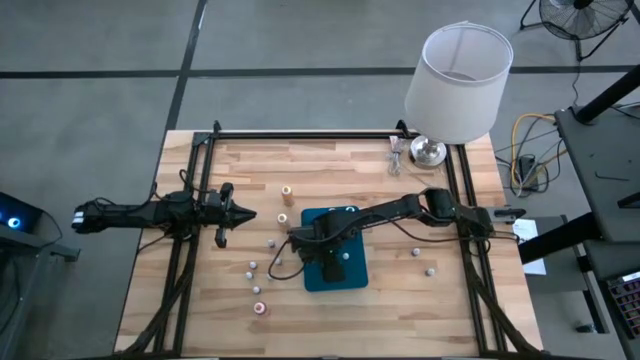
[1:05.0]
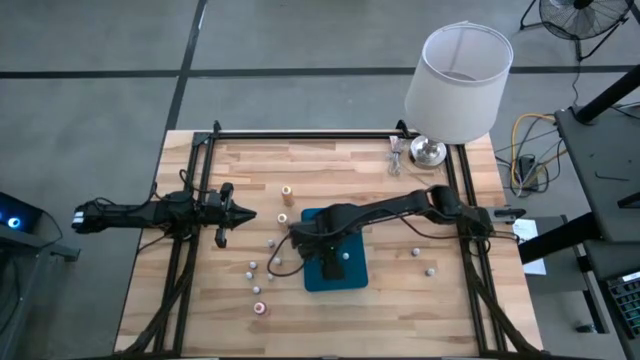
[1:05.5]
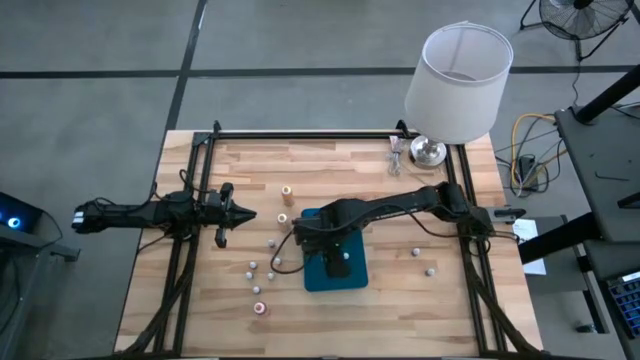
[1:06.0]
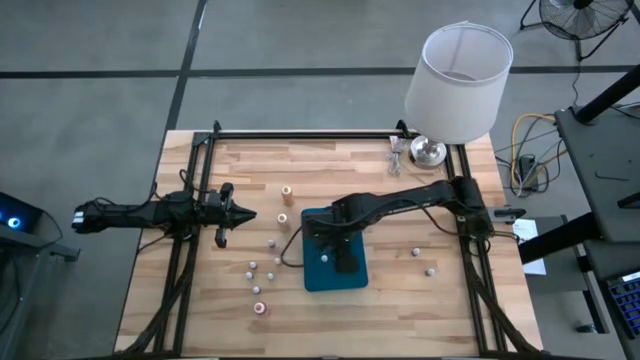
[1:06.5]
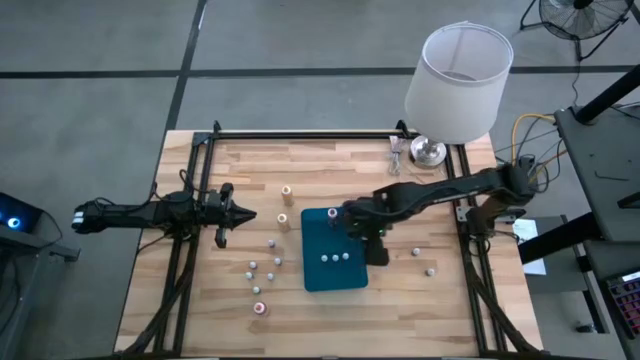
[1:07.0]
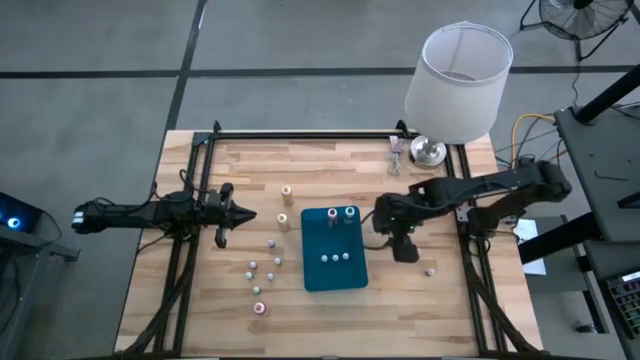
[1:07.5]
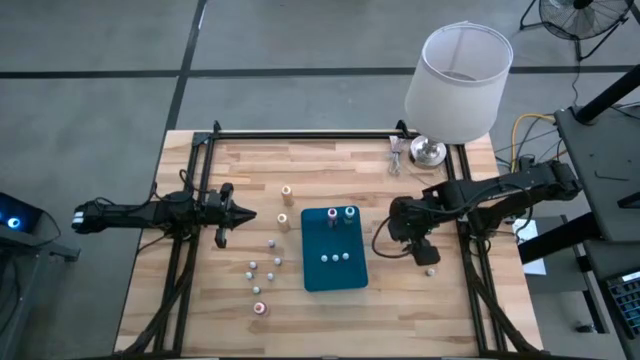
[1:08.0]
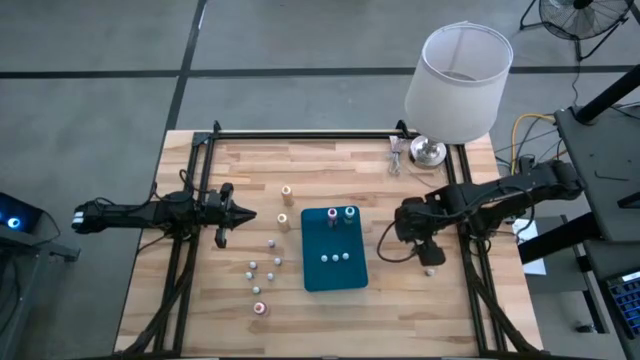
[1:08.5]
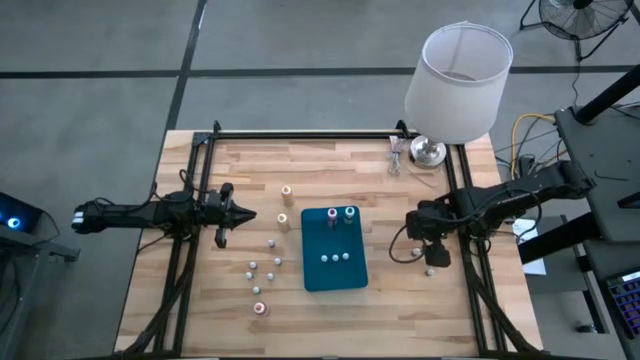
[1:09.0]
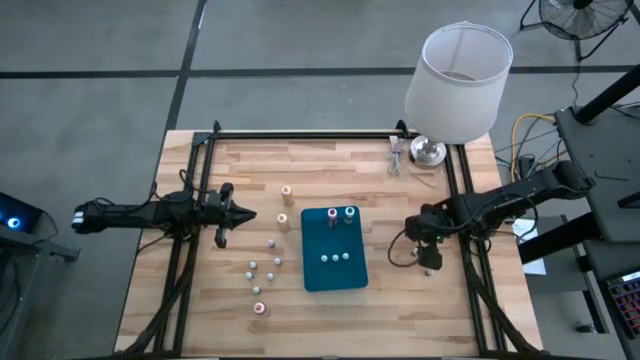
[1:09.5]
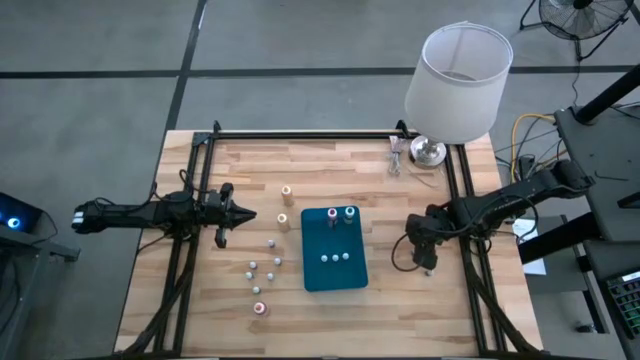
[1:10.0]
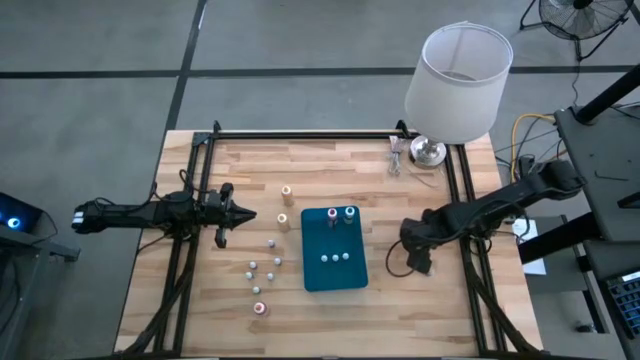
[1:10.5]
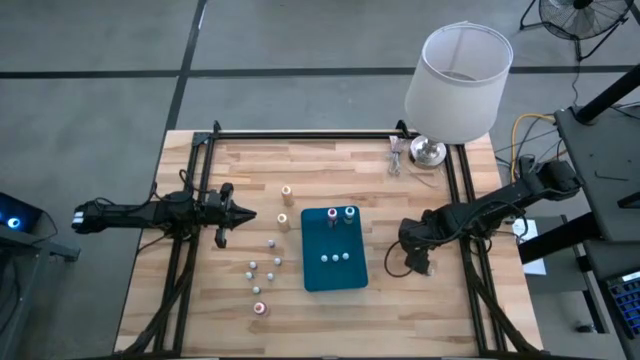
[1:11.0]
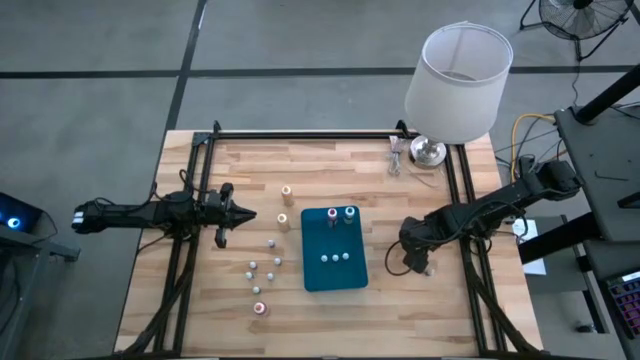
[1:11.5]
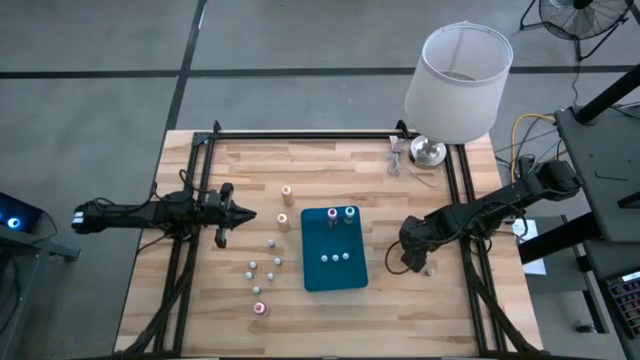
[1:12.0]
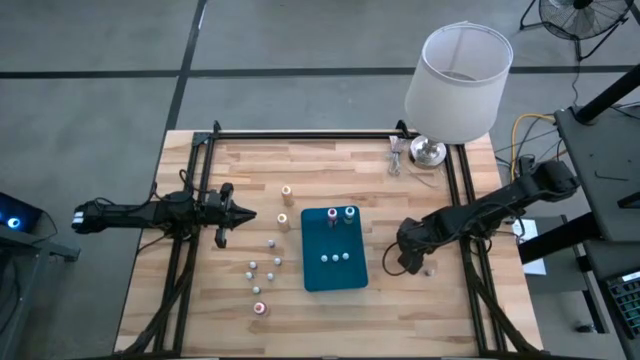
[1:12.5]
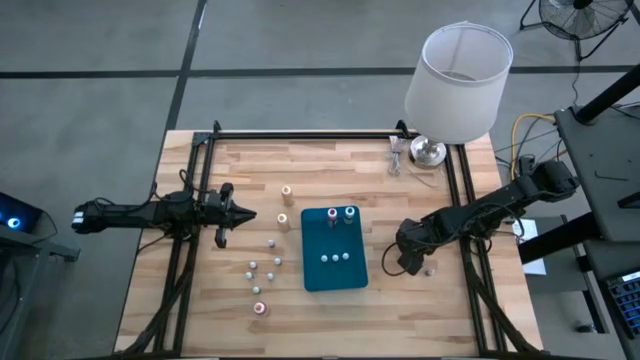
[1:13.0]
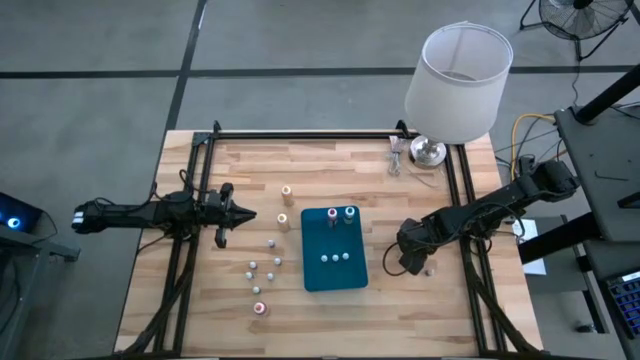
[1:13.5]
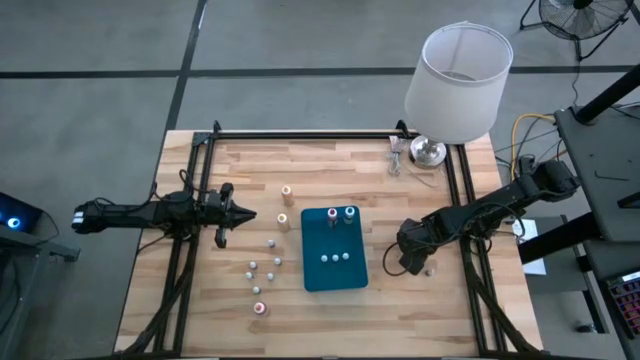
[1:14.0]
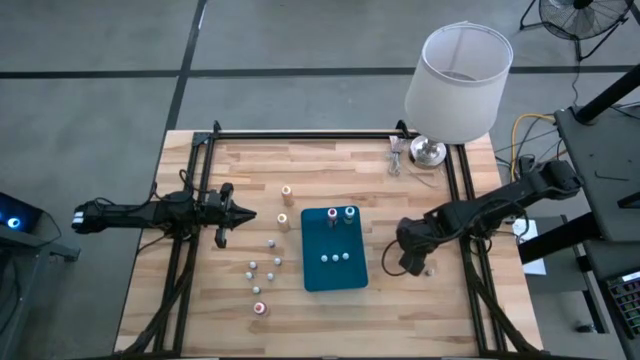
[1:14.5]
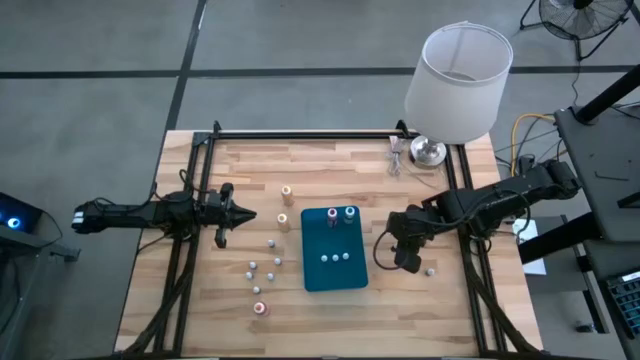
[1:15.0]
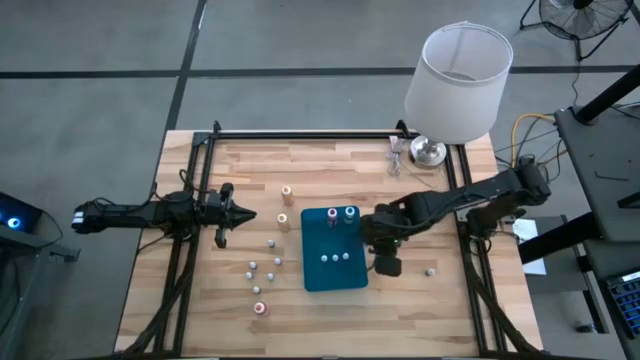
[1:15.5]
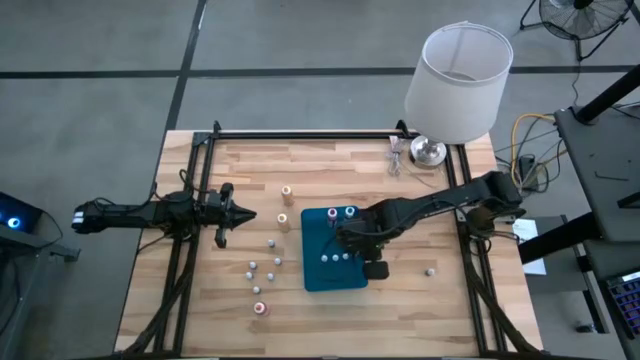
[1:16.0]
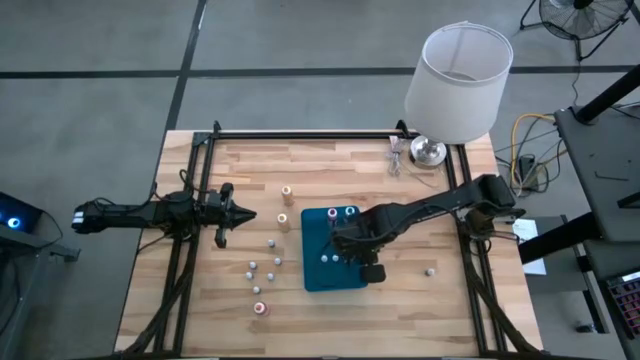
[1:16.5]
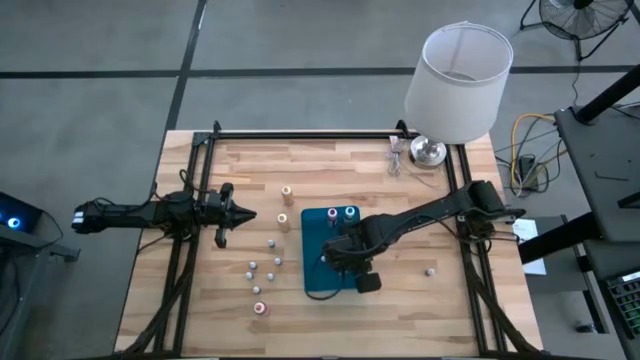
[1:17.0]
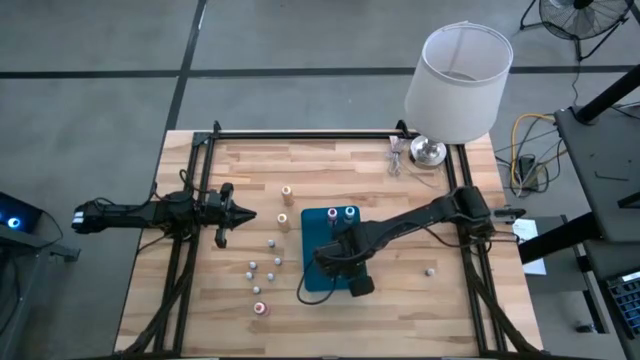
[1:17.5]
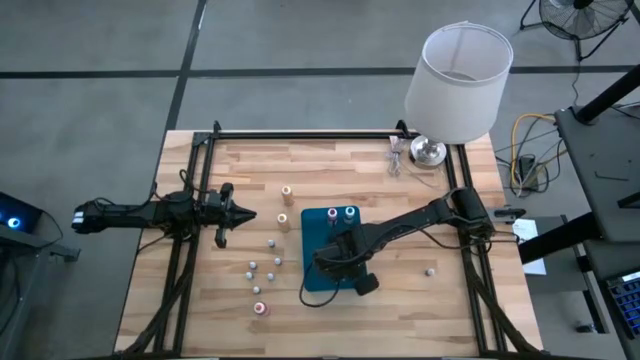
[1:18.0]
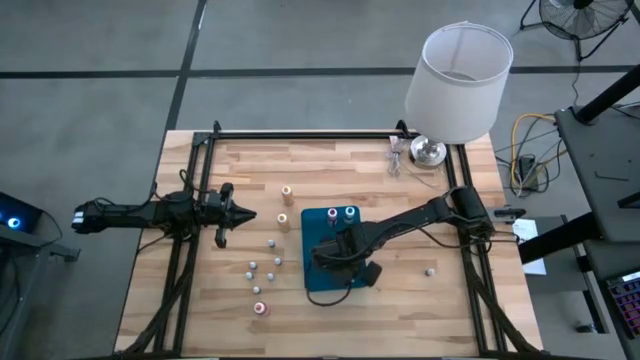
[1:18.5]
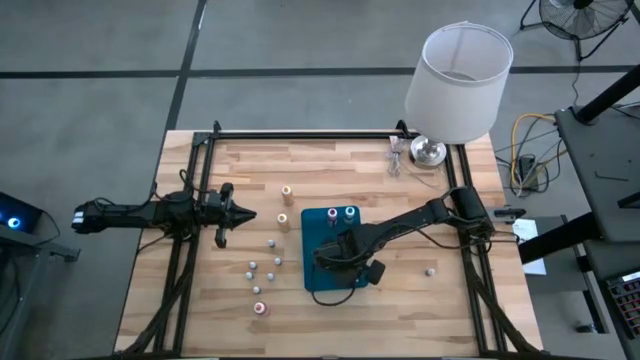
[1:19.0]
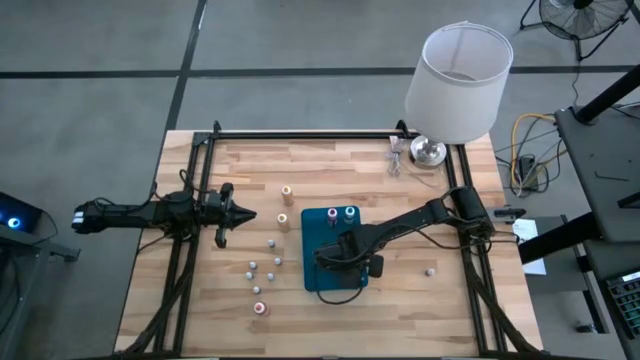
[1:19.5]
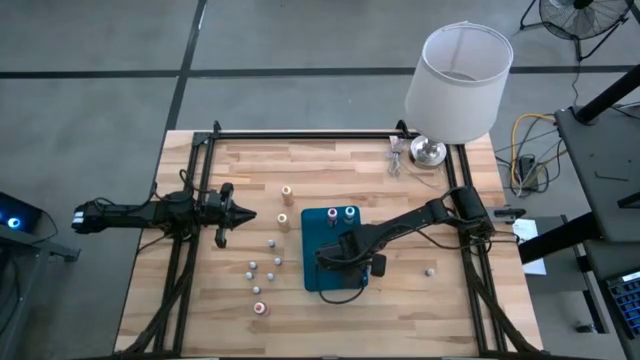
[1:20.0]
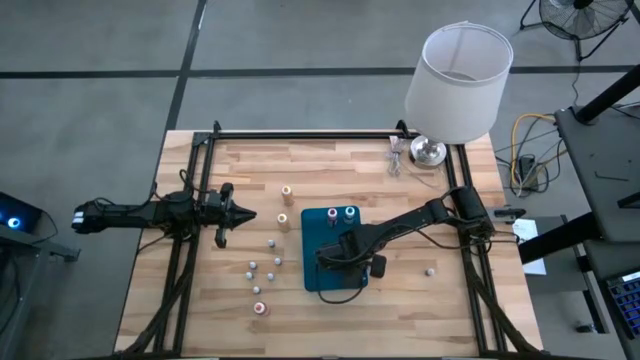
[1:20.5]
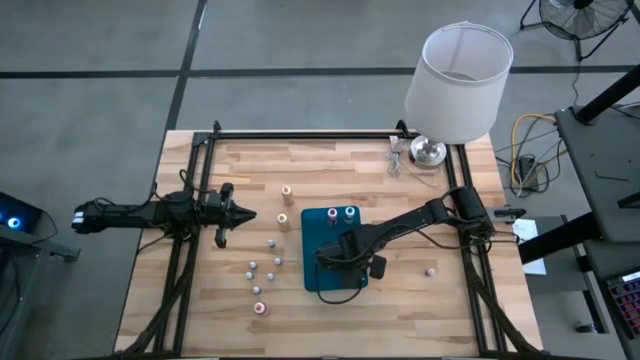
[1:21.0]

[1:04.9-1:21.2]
Task: Pick & Place food coloring
Put the small blue food coloring bottle into the blue bin
